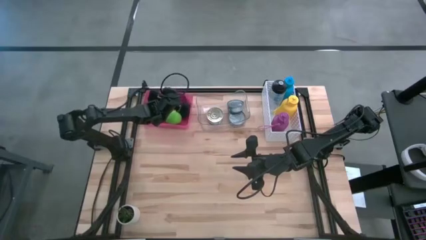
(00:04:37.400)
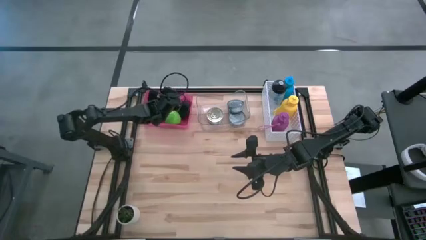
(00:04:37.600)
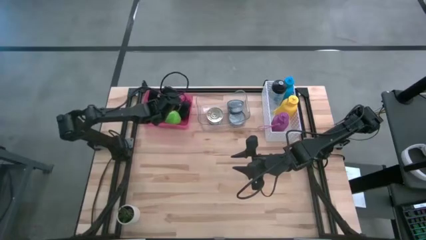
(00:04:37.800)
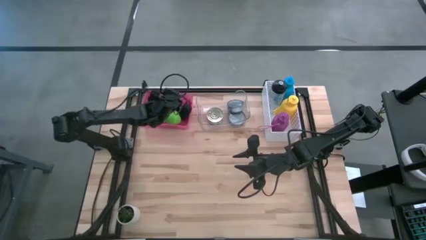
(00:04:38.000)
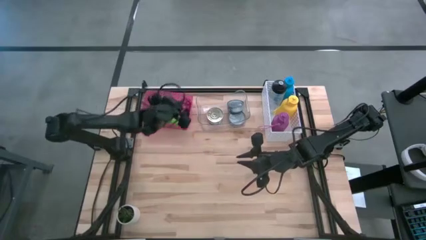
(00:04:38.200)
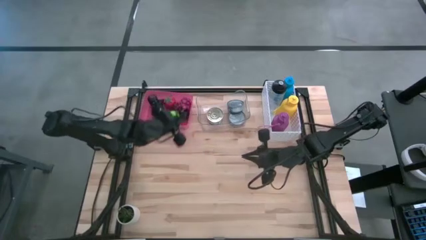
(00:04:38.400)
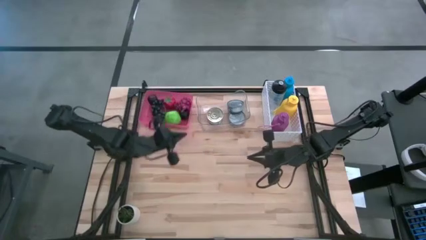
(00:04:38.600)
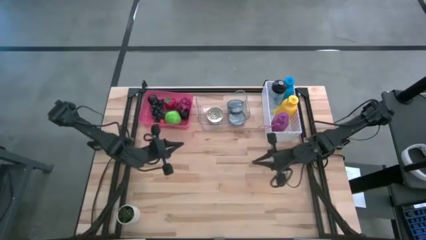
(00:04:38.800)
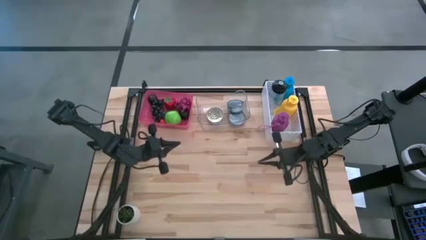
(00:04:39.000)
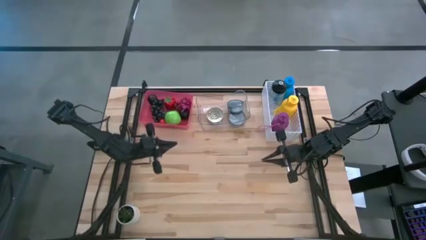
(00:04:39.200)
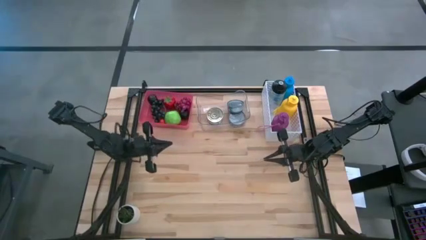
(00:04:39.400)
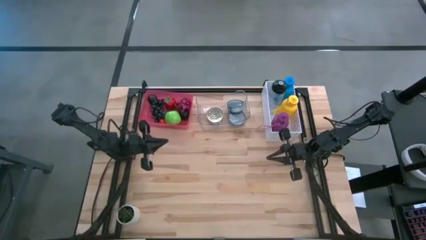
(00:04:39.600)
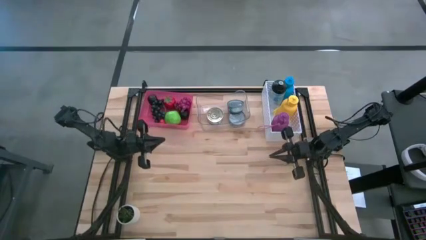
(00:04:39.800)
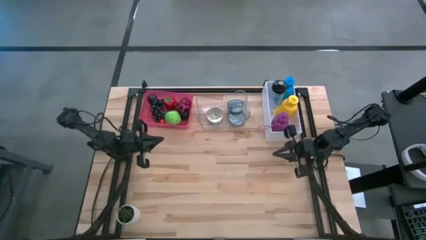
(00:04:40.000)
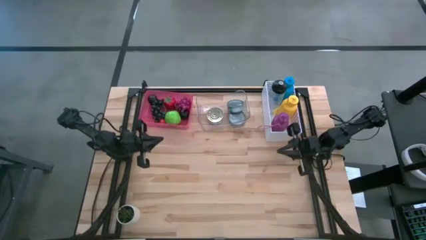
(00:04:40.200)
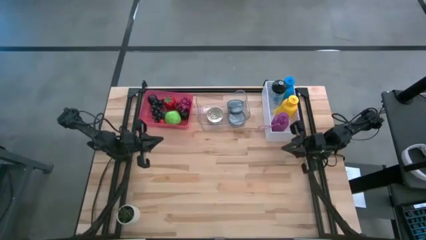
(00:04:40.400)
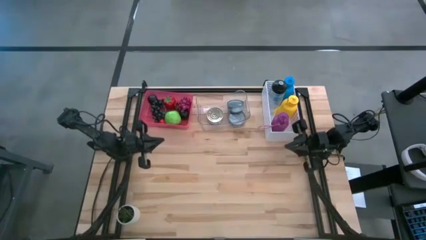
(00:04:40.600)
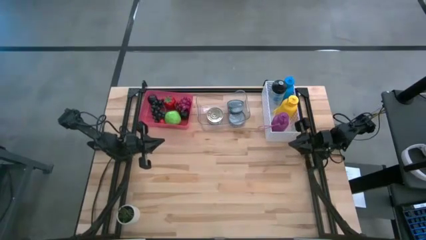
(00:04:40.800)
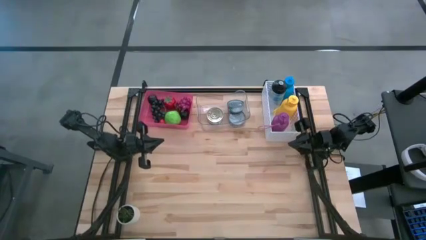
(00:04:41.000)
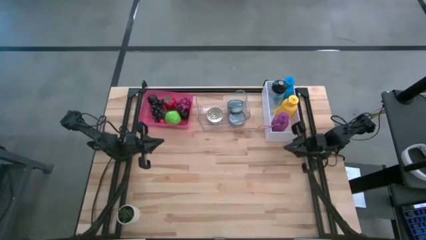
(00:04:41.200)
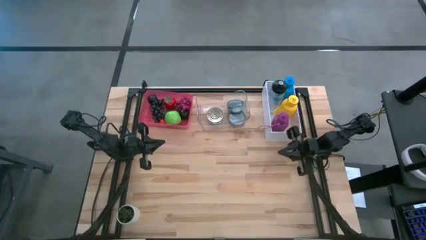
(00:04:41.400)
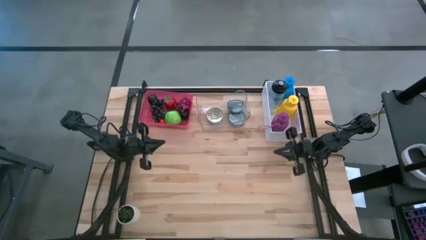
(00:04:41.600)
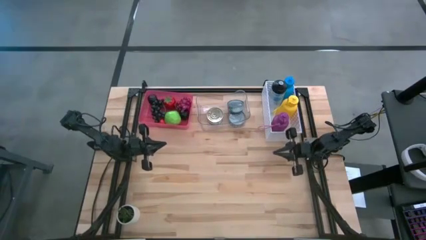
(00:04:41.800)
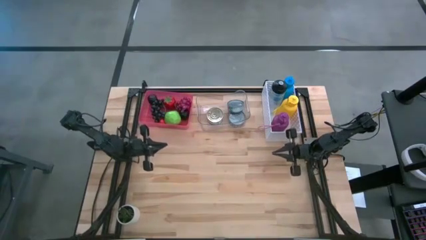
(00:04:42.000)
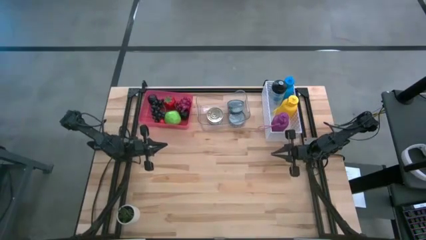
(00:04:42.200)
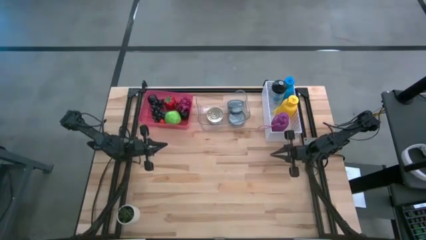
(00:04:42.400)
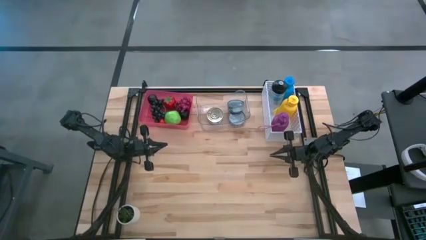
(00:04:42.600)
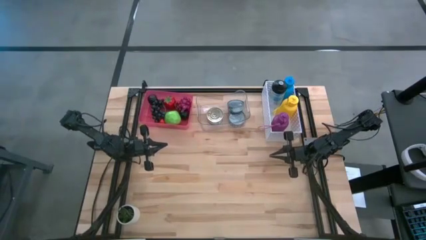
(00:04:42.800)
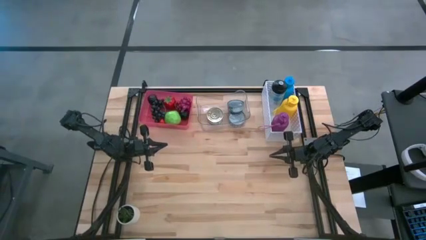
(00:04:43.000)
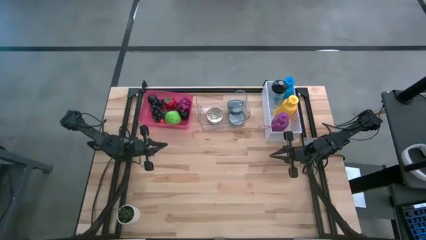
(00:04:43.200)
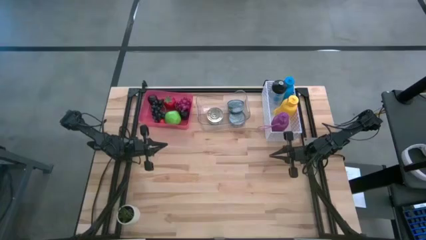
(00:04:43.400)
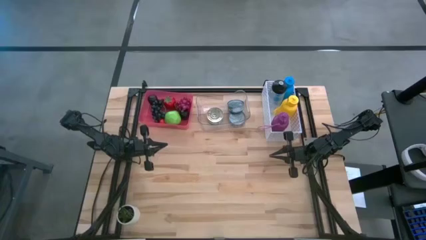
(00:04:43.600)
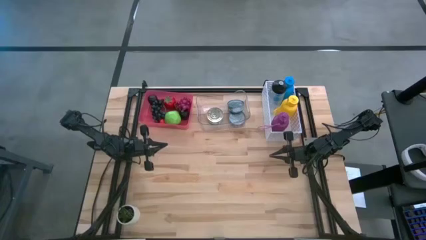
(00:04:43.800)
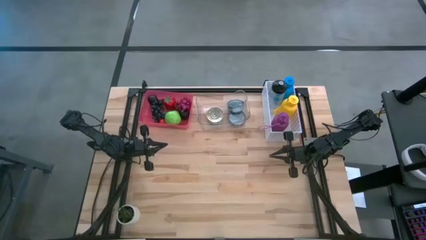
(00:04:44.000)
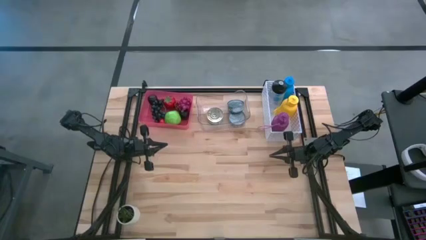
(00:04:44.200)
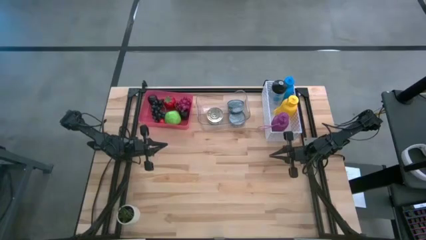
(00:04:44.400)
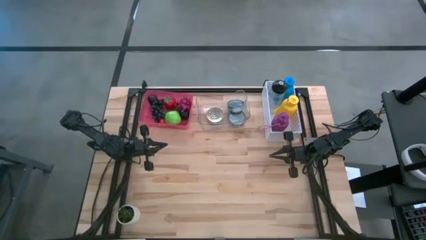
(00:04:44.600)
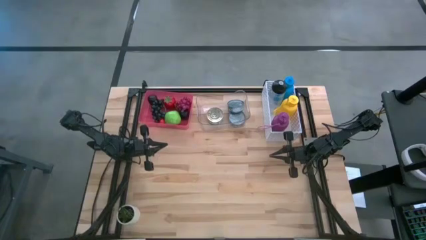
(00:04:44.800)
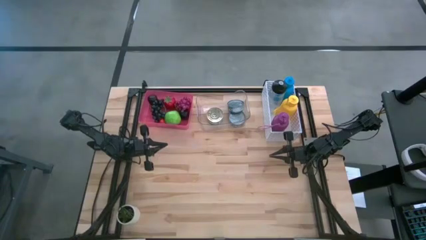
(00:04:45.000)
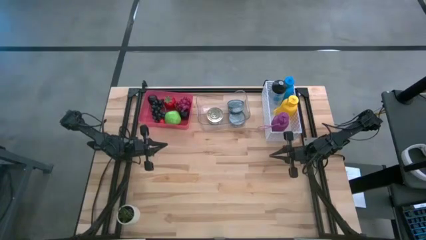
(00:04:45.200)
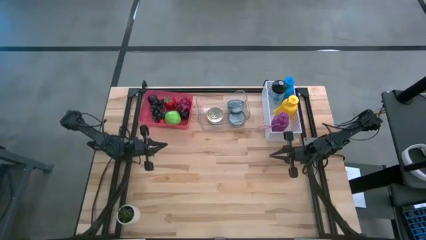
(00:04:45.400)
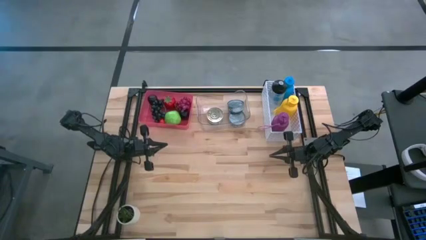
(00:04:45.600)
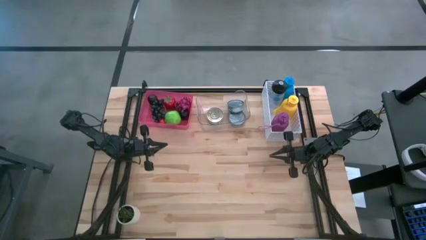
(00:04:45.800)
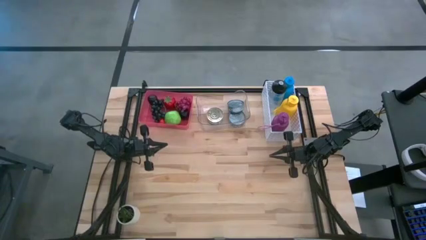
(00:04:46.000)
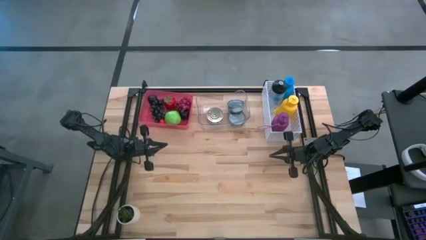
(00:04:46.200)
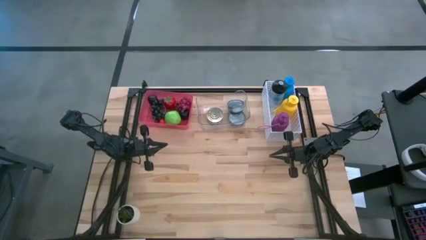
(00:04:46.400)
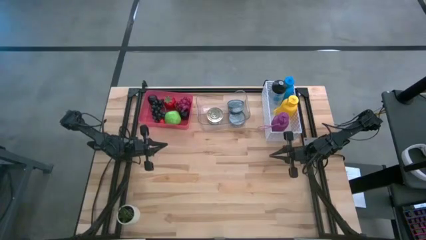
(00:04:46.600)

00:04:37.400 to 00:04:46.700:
Task: Pick & Place Food Item
Return to Home Position

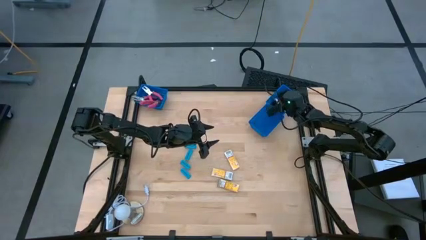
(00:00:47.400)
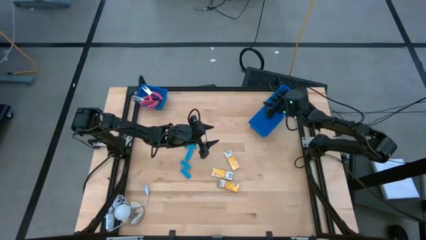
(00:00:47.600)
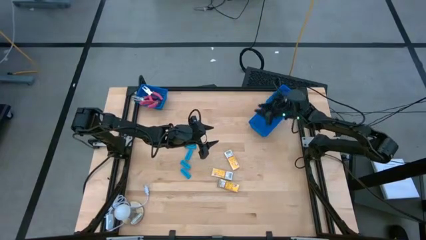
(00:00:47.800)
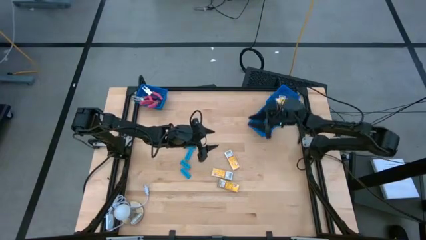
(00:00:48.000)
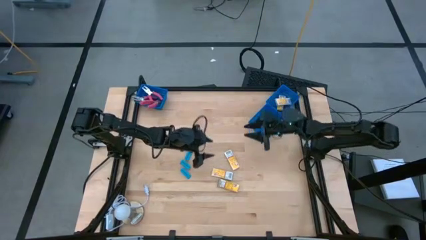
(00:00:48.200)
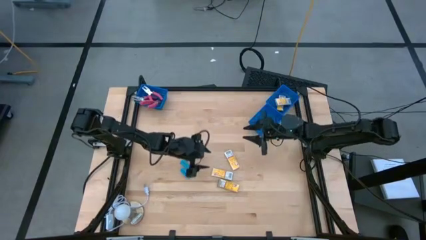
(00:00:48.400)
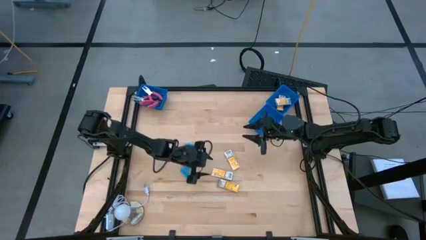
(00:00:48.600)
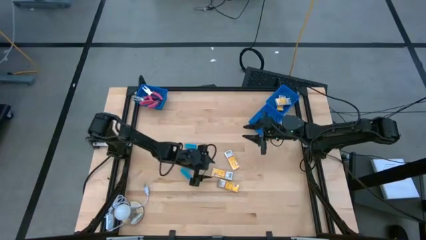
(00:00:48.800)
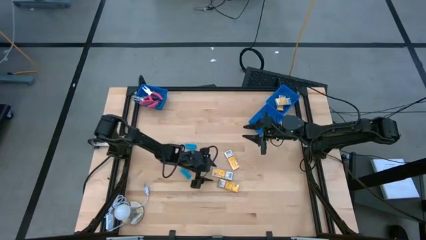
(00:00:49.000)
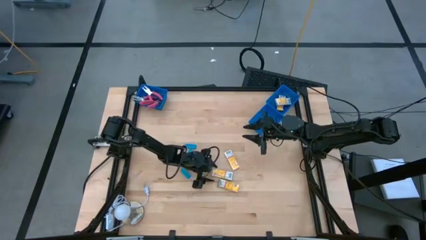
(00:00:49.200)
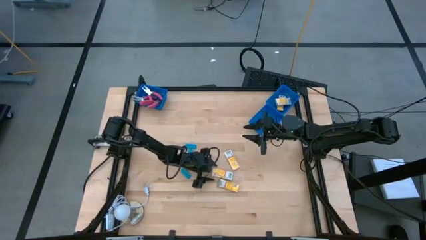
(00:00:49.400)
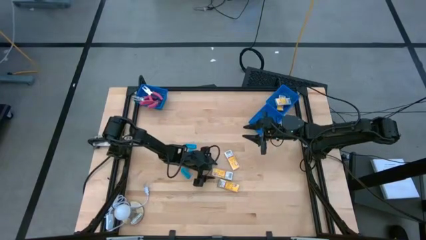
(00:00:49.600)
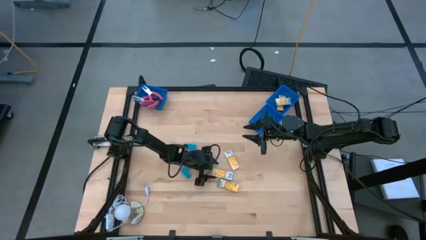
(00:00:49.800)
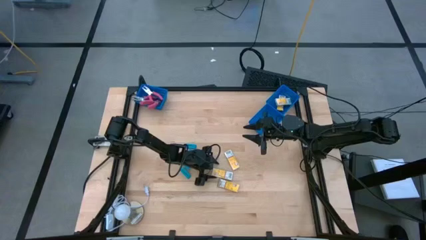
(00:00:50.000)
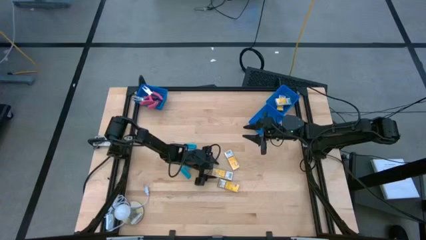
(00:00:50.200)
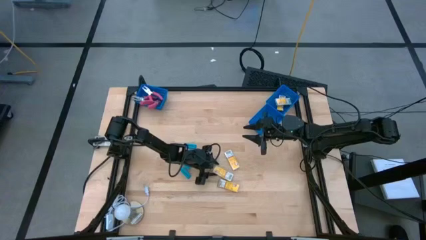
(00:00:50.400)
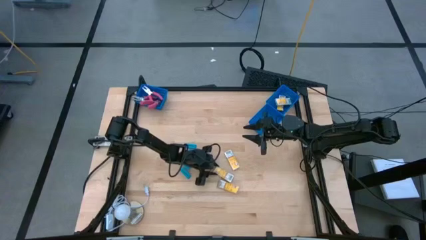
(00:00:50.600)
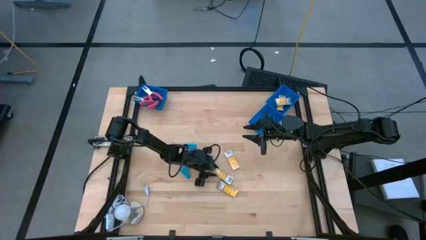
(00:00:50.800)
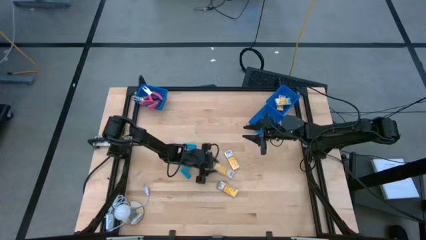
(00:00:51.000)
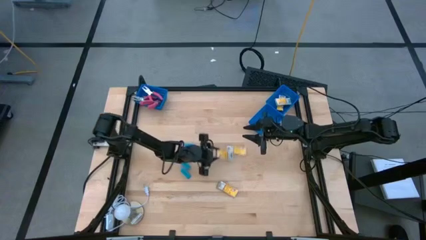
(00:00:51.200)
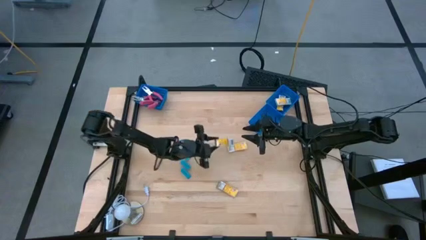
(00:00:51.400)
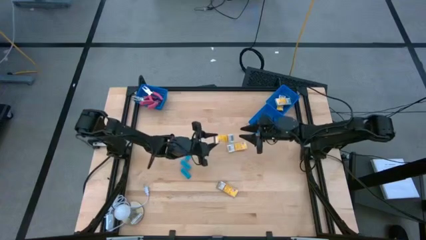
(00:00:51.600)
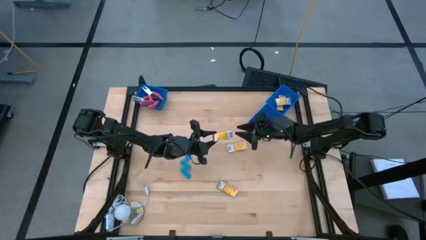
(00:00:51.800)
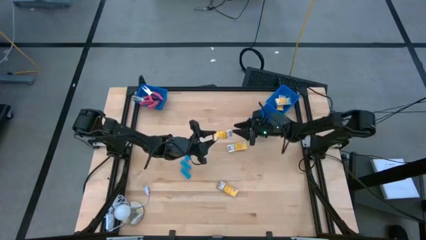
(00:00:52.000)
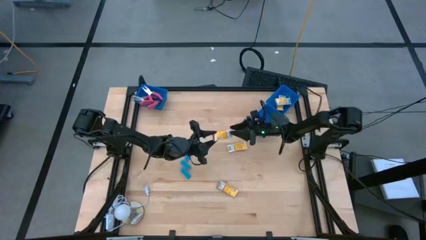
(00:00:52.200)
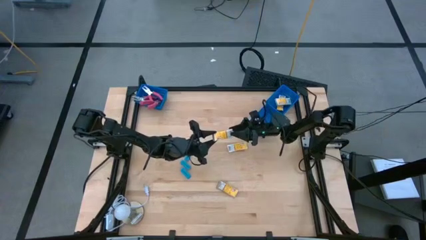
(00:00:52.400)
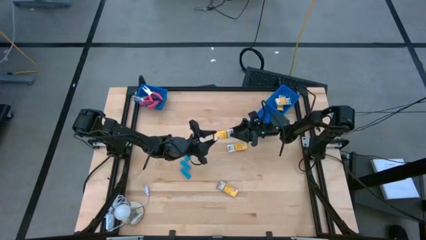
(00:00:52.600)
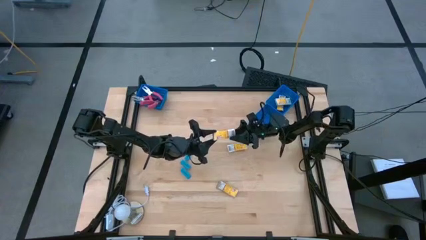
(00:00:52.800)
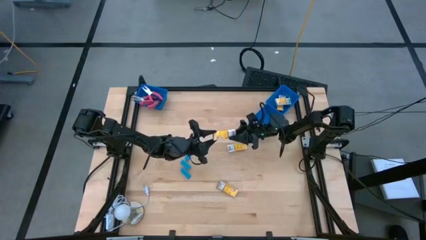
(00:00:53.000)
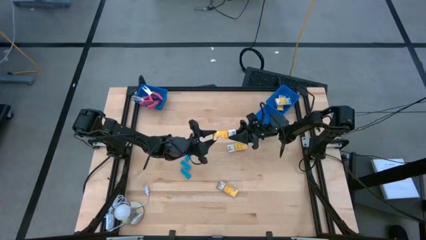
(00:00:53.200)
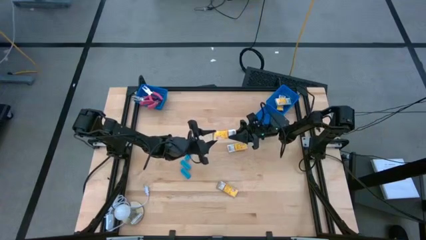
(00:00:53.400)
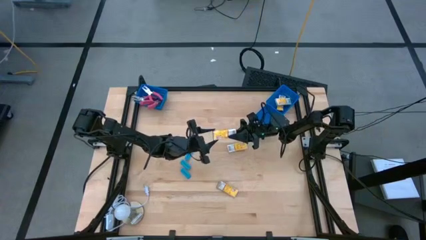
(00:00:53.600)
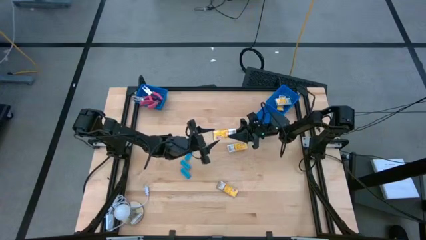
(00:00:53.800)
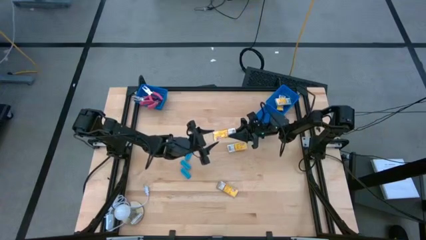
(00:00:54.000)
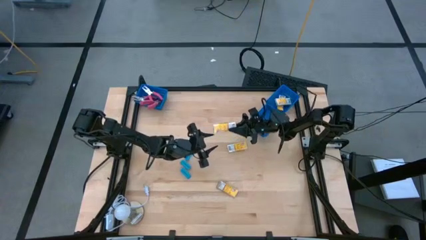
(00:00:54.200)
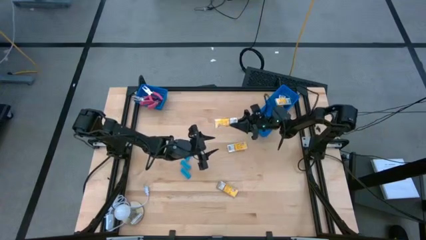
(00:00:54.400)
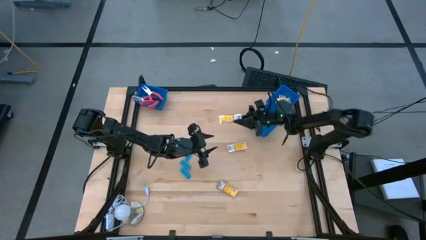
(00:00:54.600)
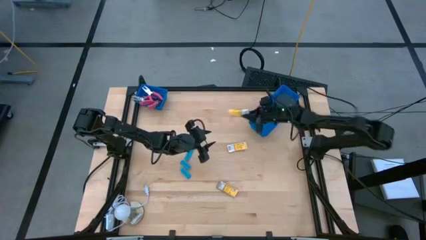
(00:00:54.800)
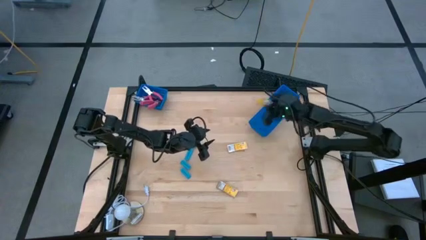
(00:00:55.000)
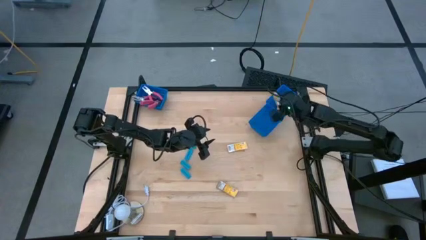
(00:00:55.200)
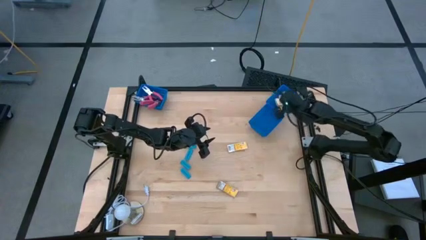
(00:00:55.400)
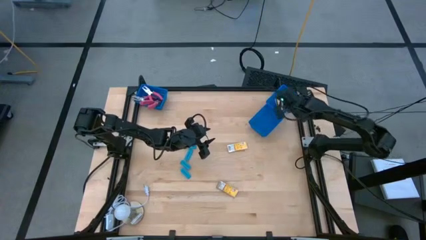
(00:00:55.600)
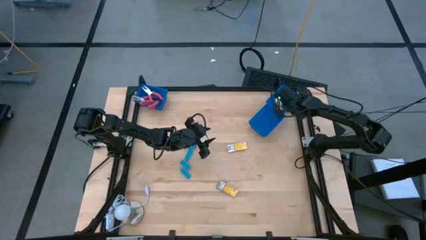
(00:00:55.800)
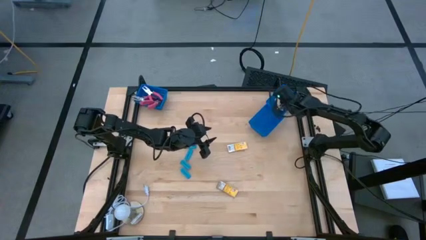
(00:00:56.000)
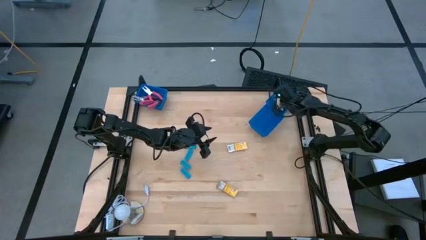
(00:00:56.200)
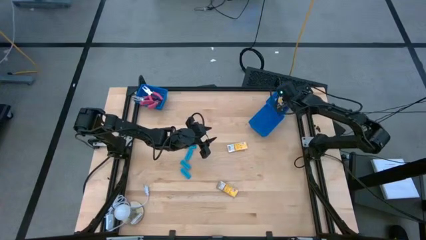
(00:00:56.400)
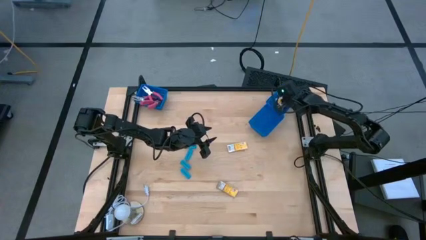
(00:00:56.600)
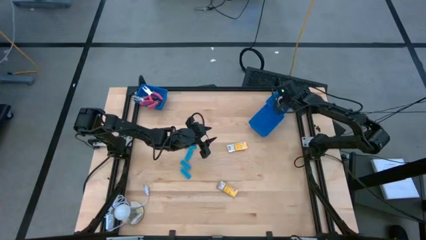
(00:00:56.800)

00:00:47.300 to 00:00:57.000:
Task: Pick & Place School Supplies
Put the yellow crayon box into the top right blue basket
